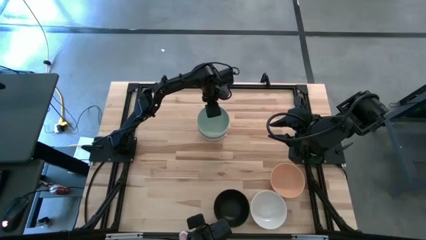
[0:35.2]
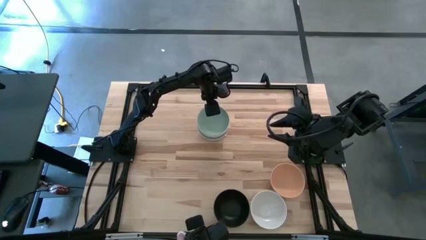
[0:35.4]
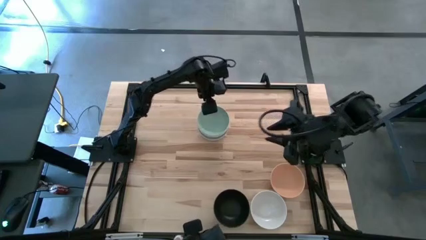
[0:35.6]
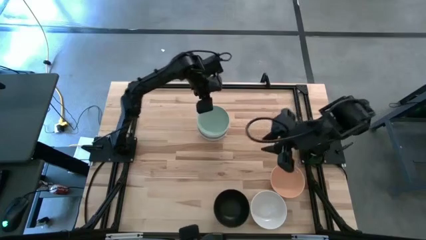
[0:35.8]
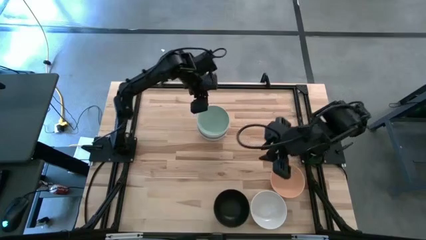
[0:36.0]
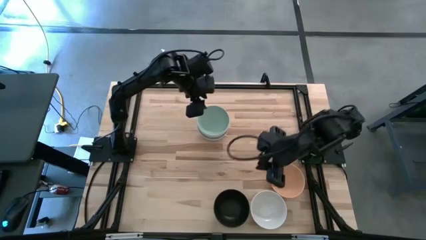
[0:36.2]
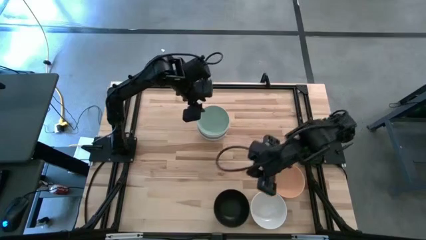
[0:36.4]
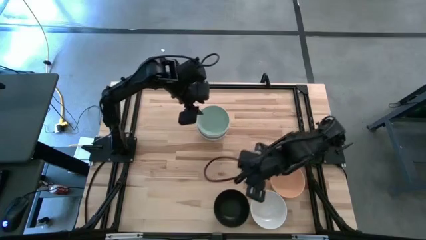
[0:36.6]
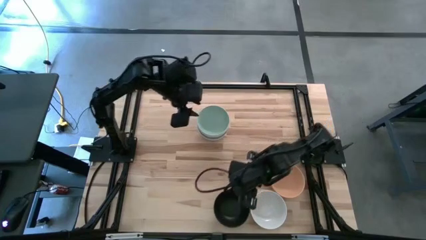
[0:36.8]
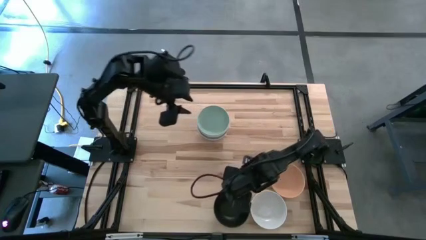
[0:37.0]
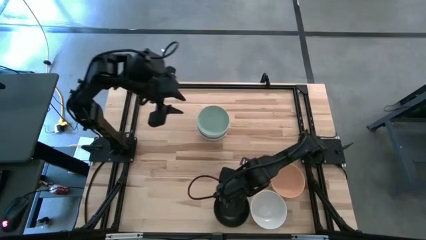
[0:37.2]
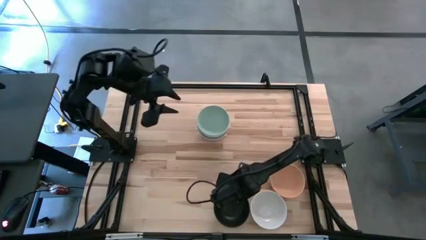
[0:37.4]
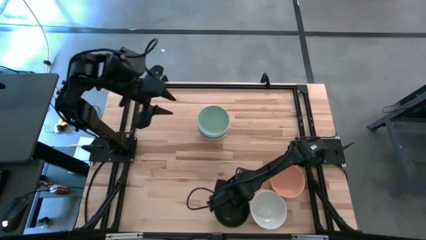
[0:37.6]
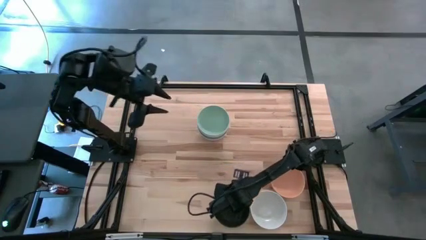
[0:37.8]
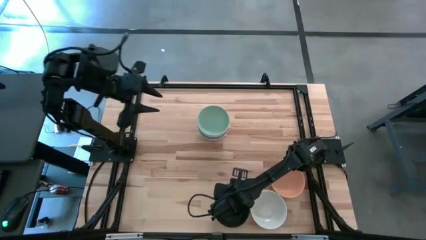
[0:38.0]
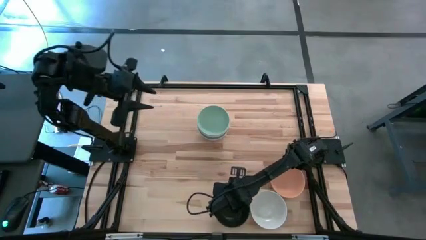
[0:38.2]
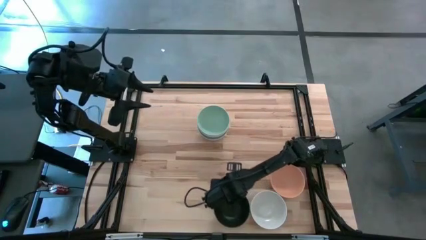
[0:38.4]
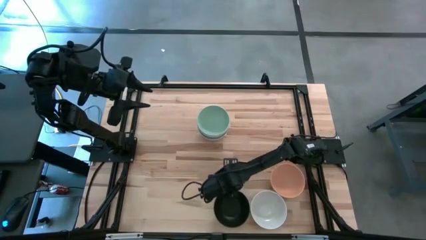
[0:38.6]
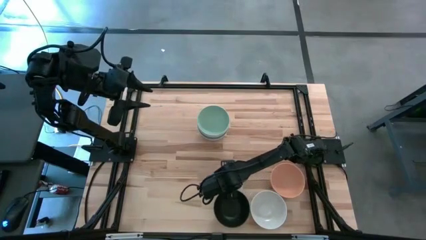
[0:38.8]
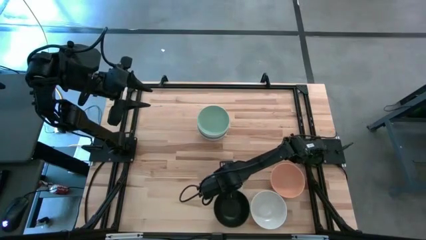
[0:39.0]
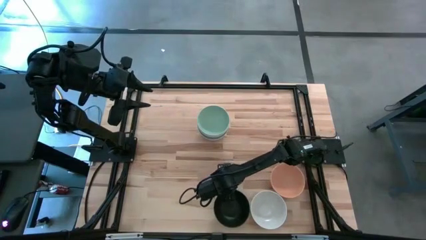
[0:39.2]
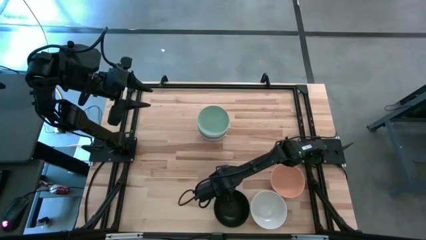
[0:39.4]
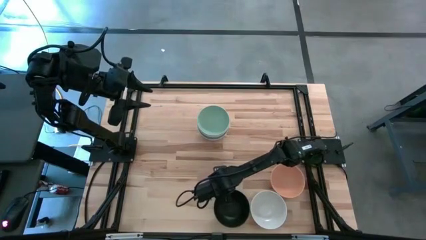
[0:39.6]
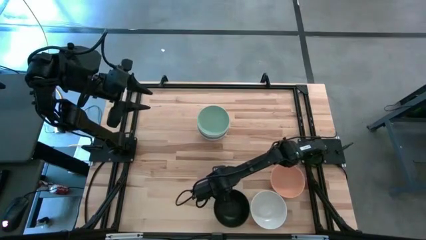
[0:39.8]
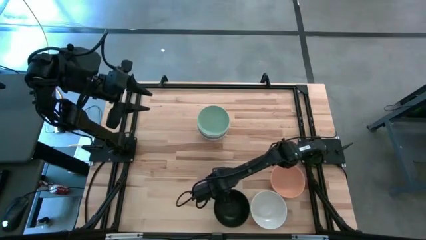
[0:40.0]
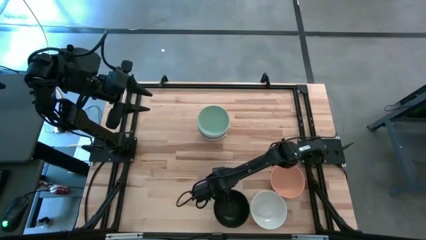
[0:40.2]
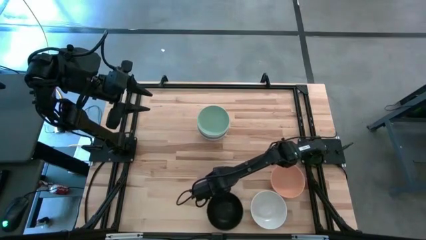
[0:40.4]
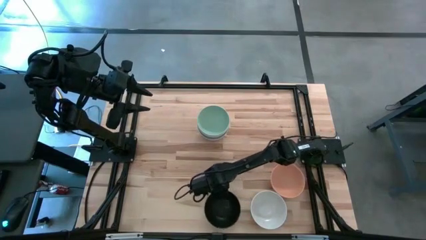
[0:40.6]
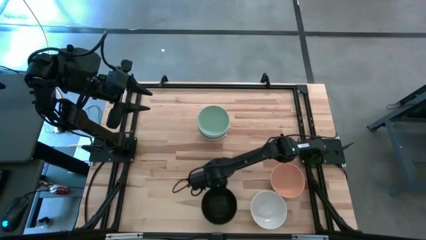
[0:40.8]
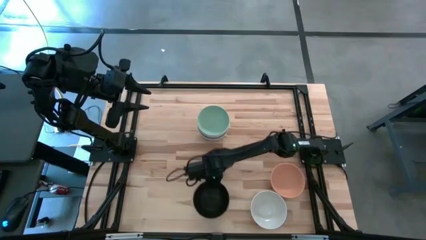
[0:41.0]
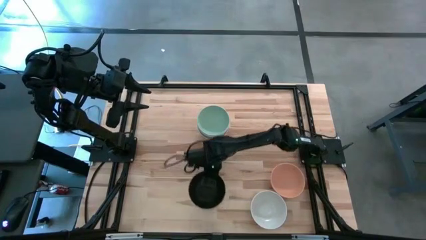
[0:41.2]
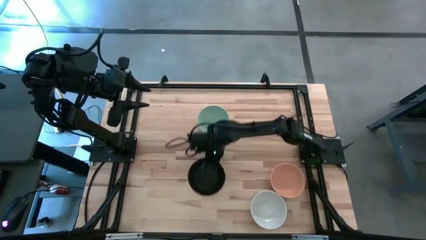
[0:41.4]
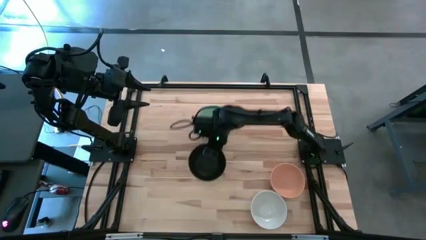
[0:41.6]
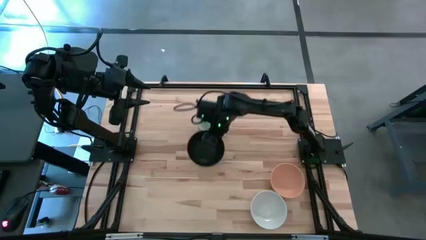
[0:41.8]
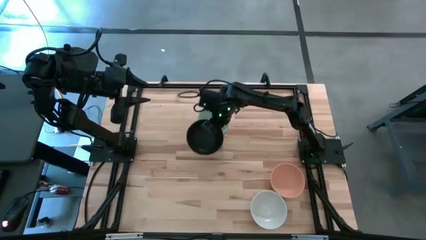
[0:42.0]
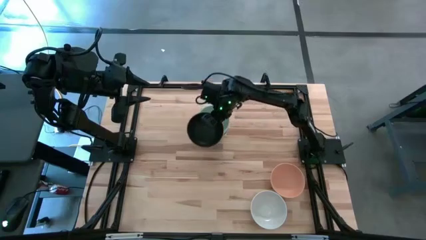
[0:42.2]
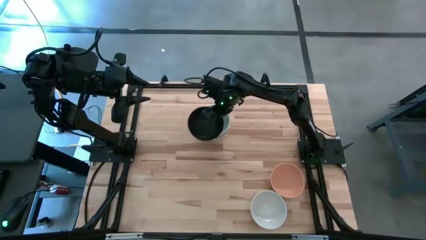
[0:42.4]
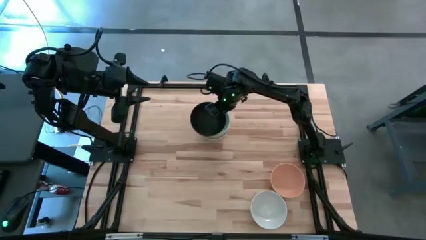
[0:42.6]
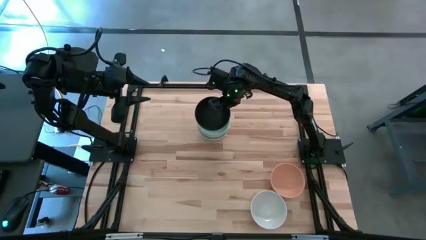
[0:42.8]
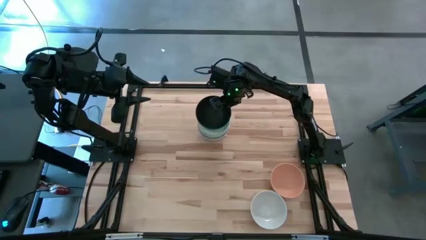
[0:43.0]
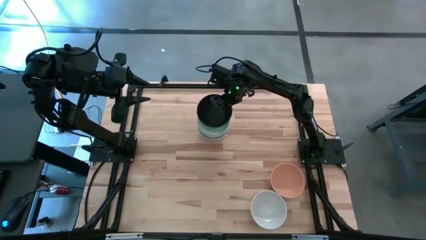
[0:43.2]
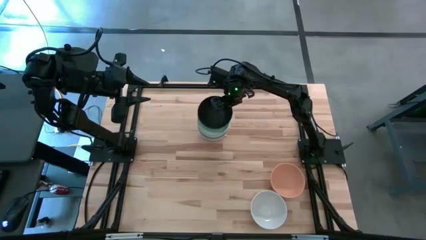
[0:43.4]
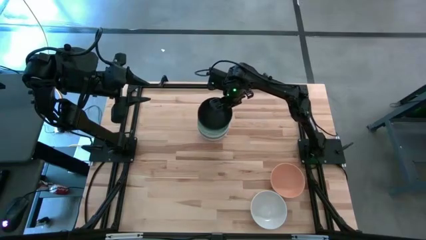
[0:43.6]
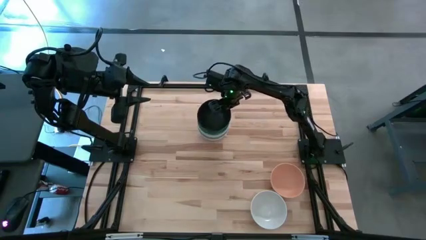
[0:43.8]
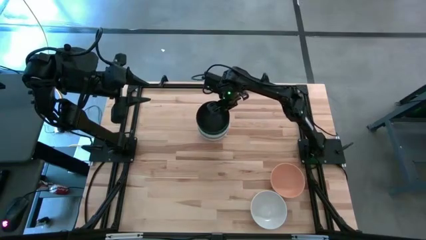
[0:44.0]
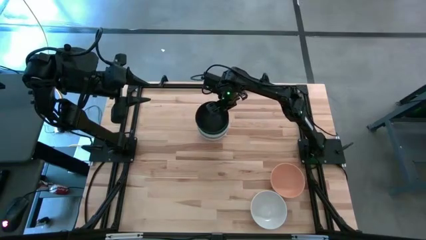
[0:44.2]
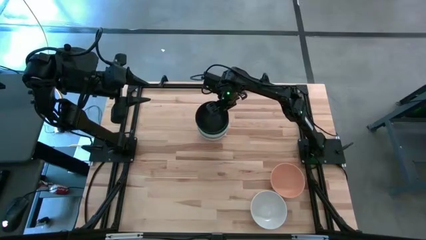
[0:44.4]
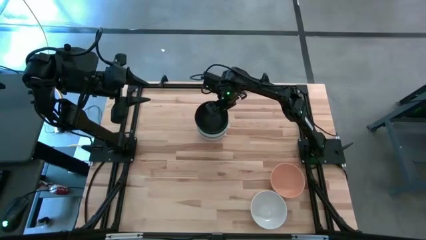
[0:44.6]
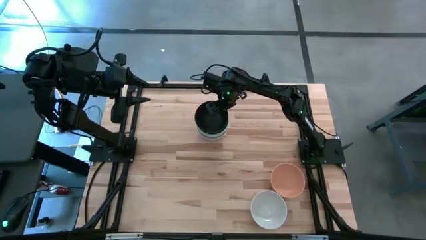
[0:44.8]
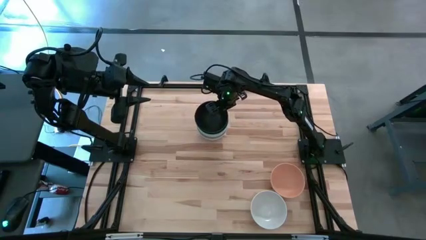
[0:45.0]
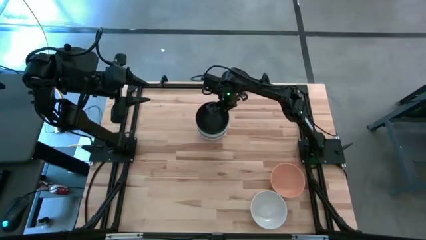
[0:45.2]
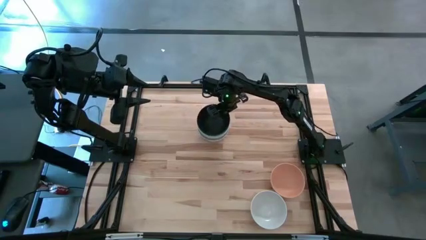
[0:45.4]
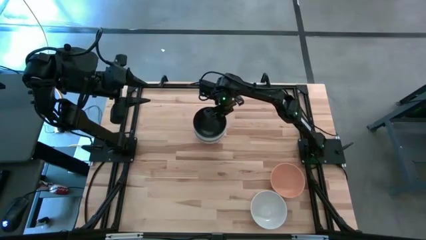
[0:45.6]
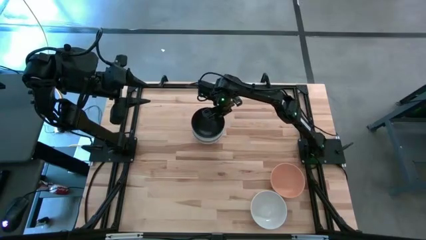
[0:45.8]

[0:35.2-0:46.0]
Task: Nest bowls inside each other
Stack the black bowl on the light green bowl
